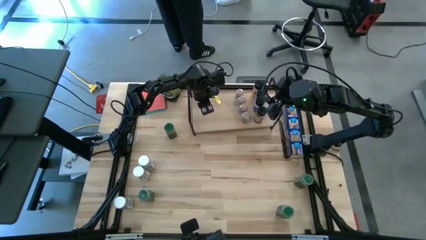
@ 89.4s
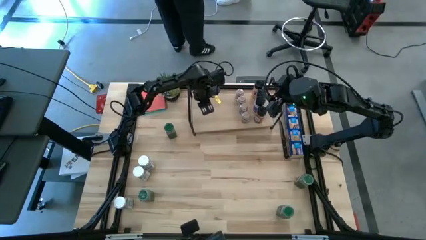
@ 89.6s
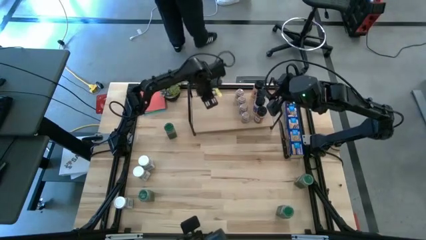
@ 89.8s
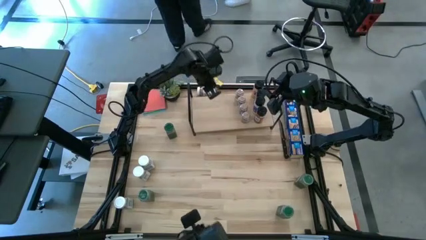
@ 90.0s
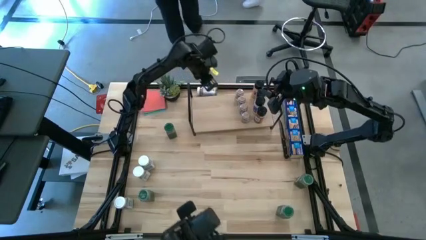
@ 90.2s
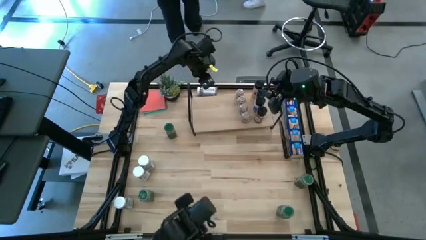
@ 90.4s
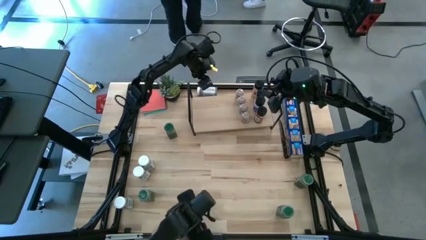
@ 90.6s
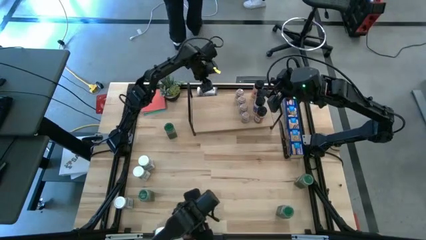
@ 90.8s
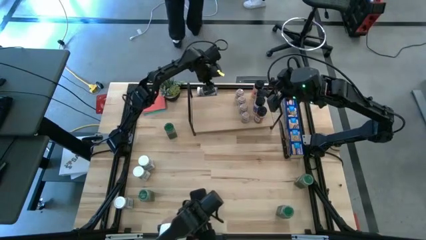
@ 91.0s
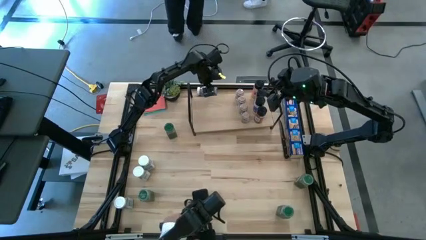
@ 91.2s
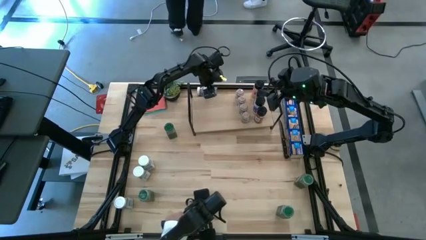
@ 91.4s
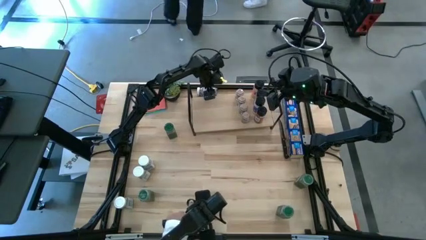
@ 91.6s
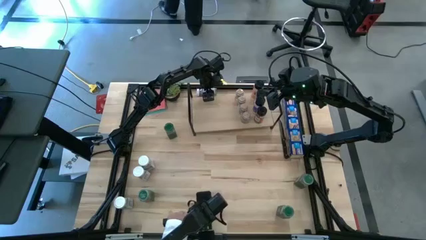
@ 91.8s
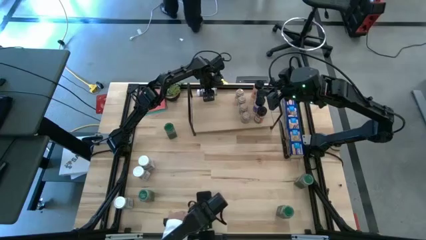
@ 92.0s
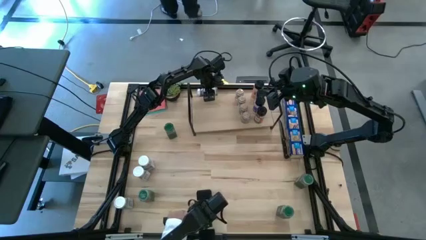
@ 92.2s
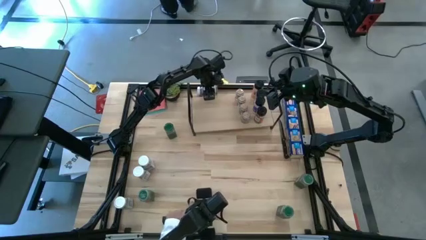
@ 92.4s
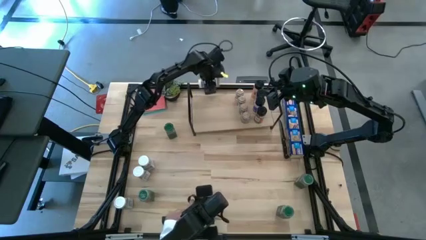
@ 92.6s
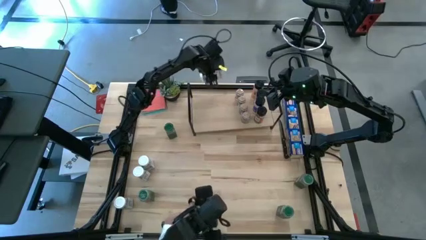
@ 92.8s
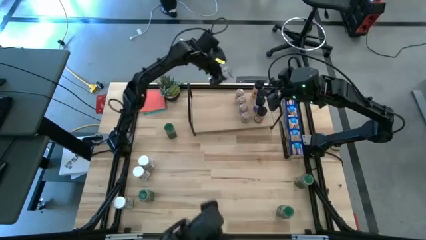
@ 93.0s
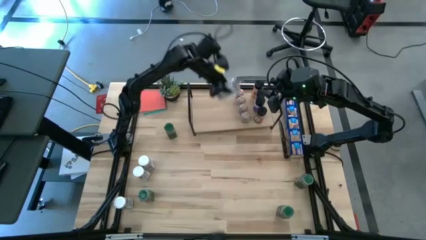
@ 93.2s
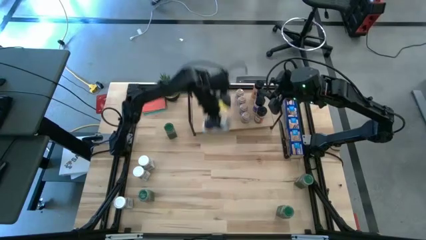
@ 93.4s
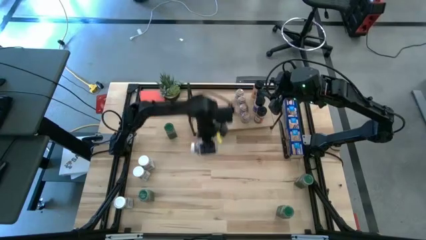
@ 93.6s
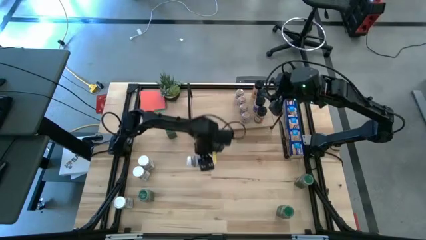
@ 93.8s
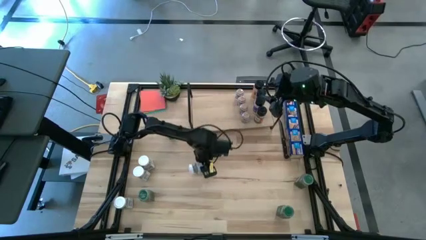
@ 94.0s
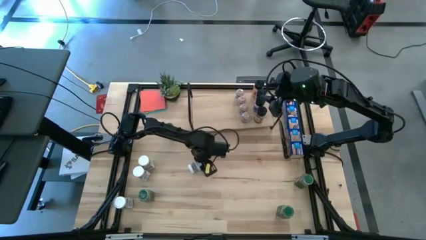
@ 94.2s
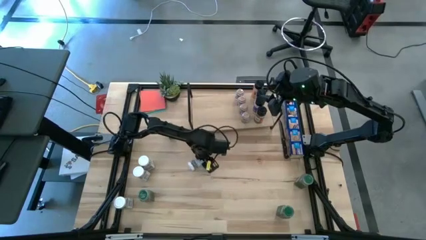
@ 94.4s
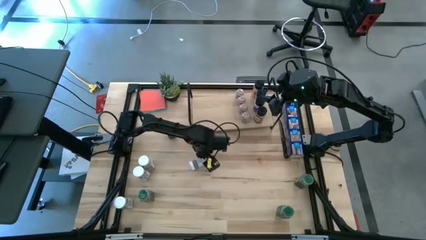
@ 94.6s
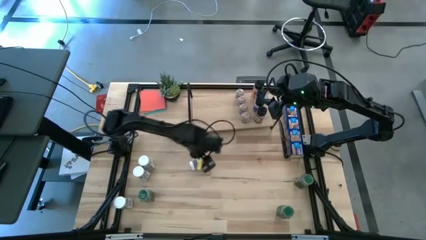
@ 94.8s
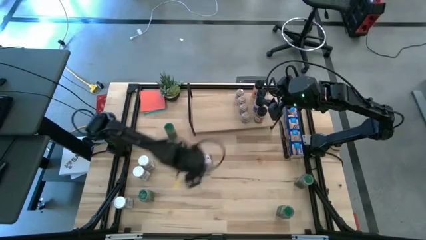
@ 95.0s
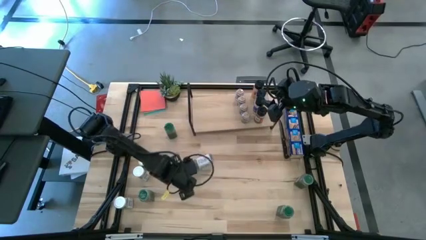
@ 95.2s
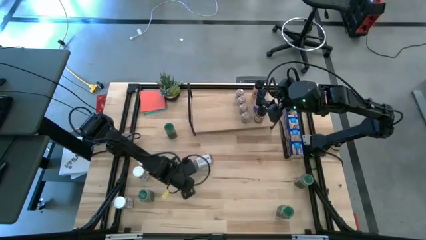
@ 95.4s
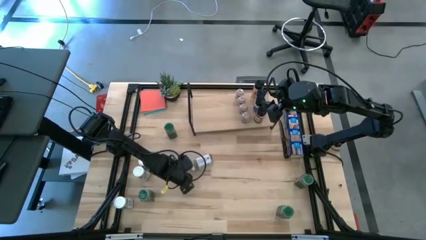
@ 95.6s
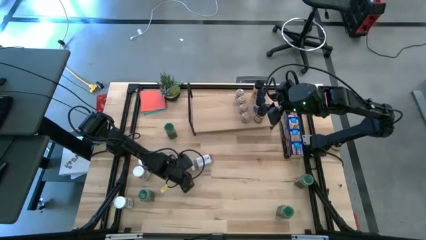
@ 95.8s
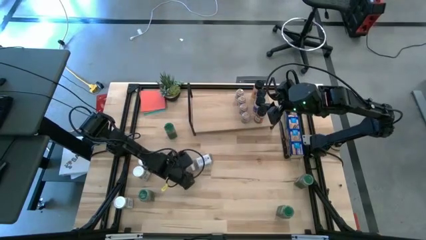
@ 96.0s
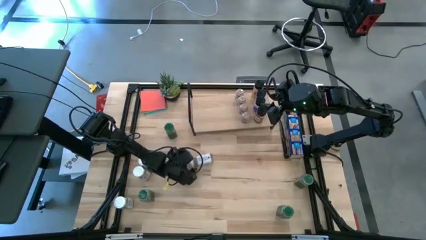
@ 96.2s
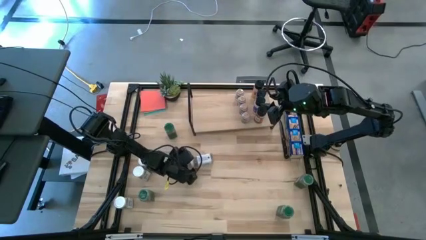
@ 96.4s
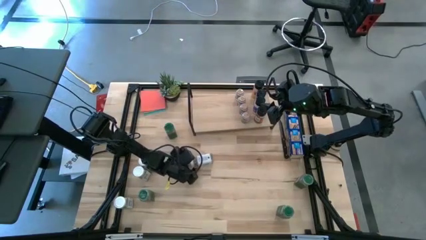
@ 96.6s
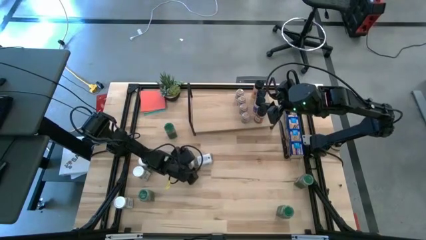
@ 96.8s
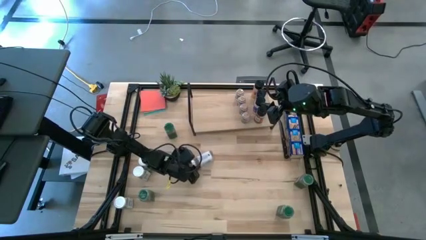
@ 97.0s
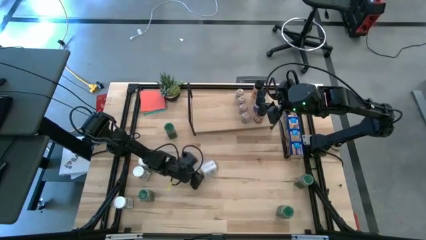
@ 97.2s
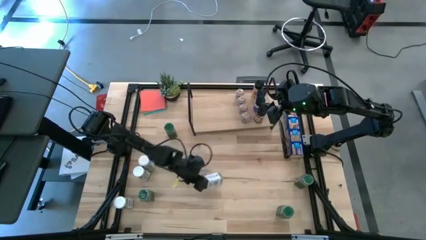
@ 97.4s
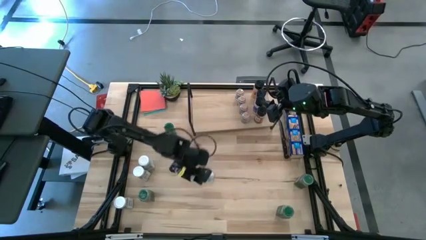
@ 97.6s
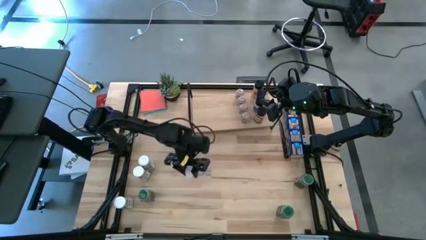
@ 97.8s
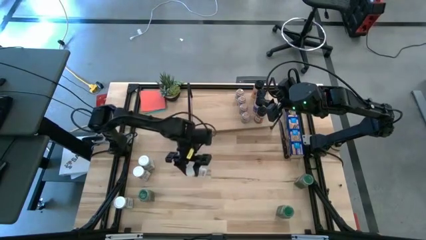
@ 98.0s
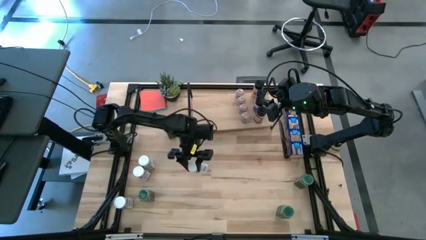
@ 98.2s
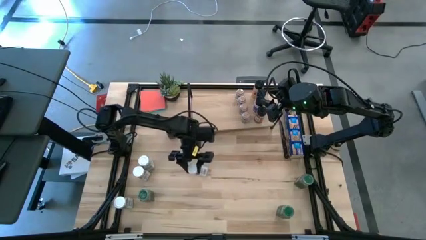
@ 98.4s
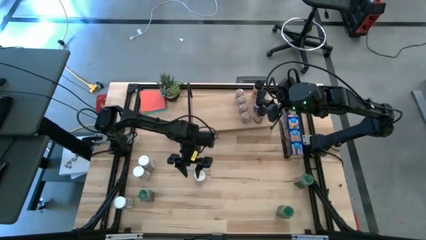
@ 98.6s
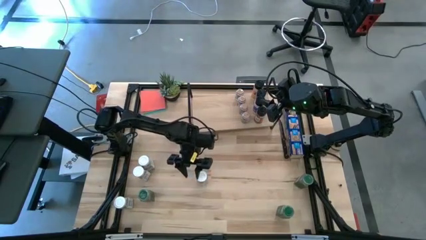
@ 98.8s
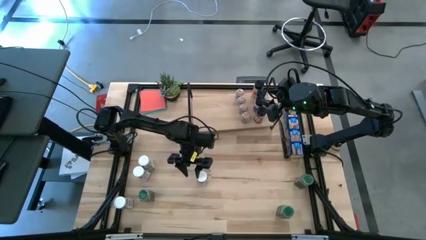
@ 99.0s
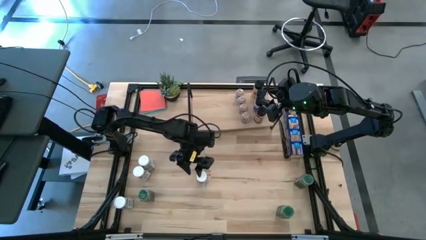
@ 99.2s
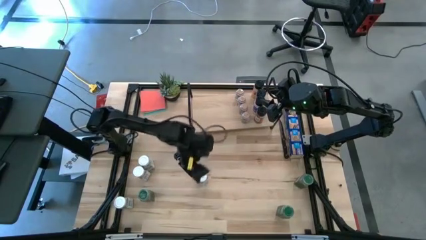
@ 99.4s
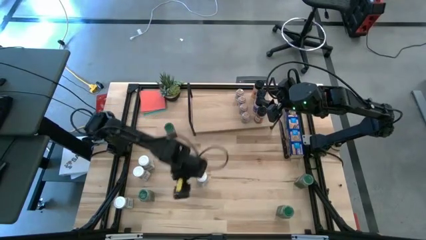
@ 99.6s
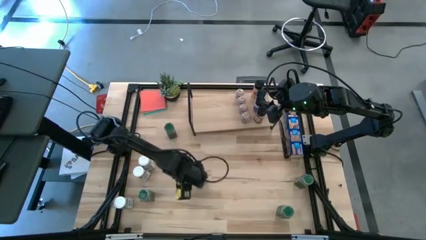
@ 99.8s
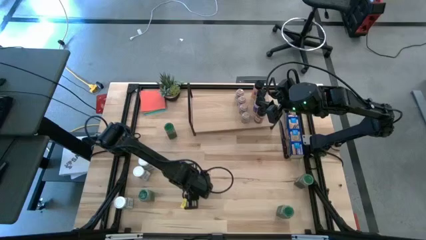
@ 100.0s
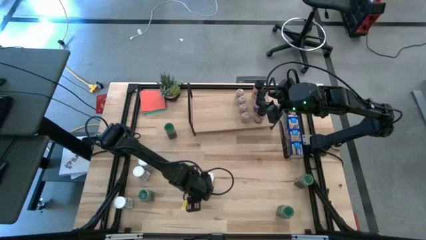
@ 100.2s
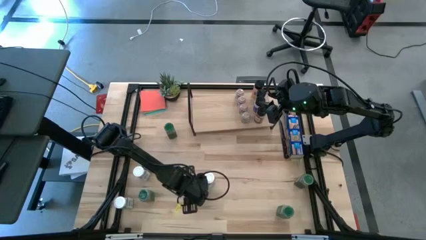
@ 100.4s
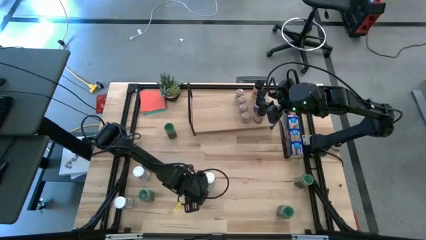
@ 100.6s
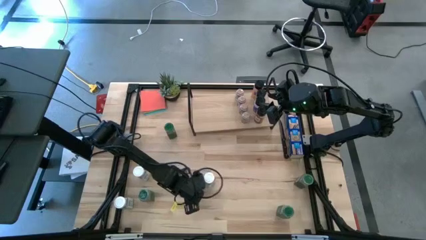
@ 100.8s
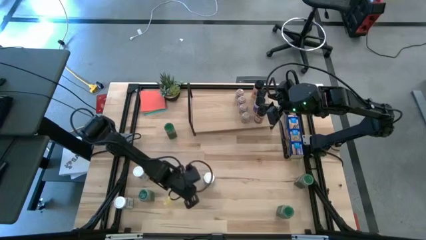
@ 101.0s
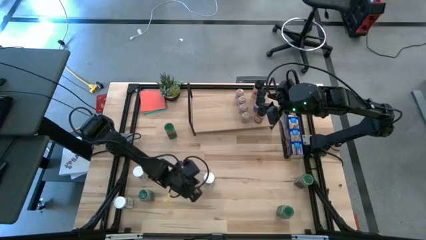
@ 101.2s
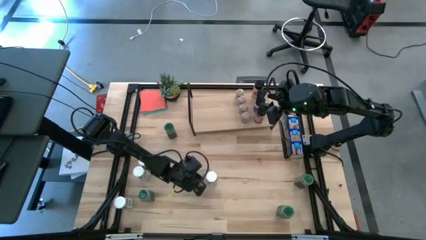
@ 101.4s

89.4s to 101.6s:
Task: Shelf spices
Put the white seasoning bottle on the shelf

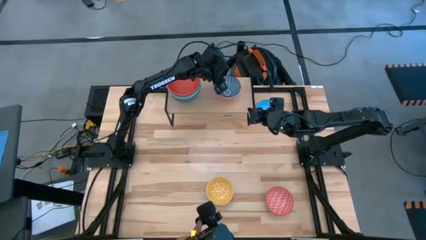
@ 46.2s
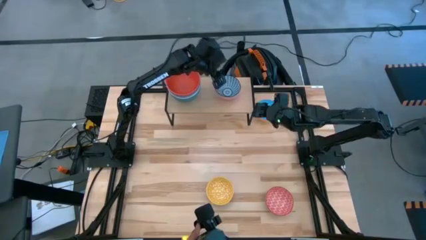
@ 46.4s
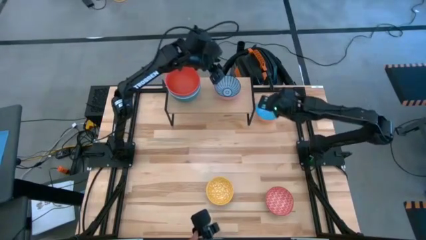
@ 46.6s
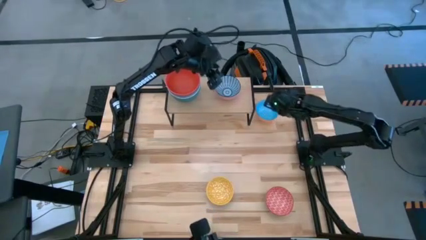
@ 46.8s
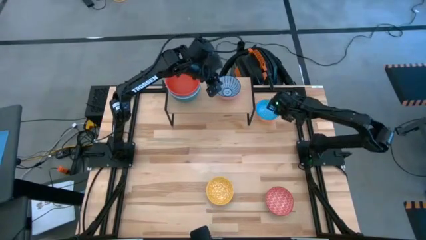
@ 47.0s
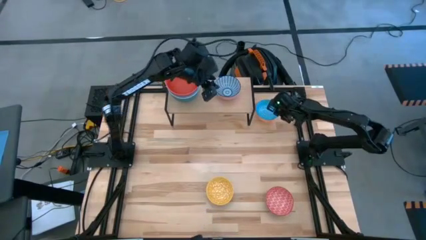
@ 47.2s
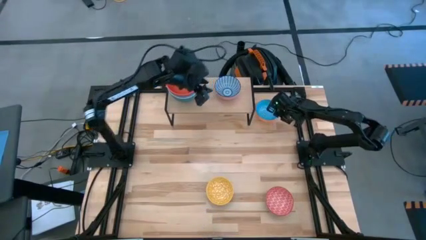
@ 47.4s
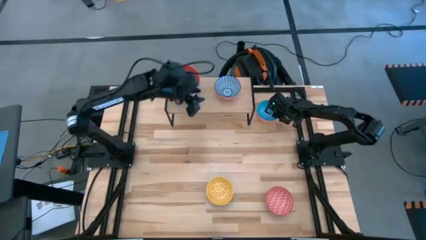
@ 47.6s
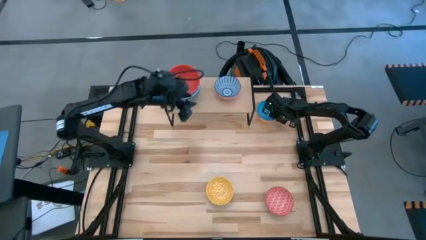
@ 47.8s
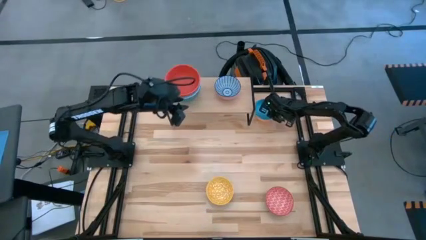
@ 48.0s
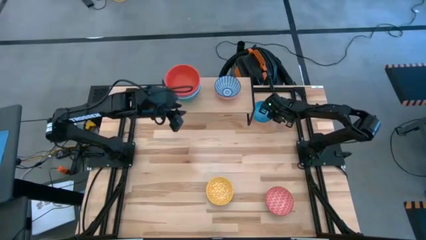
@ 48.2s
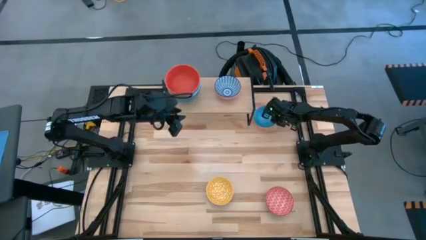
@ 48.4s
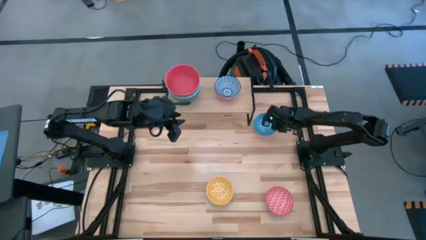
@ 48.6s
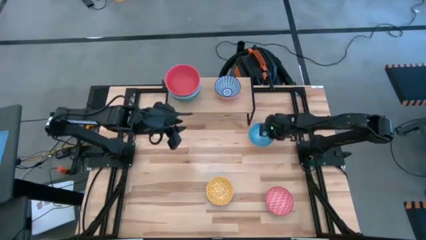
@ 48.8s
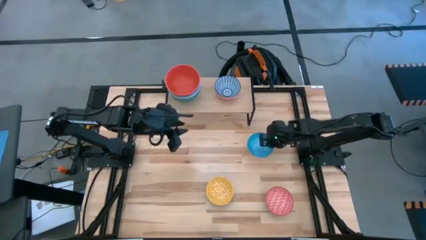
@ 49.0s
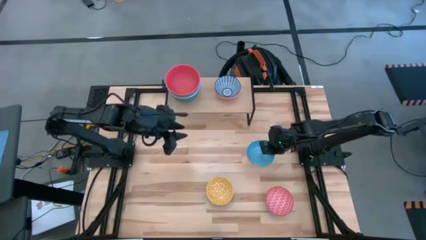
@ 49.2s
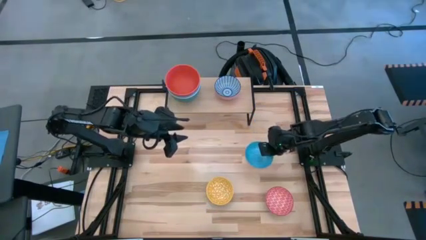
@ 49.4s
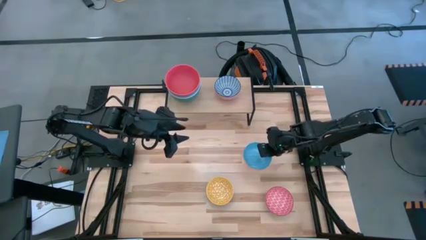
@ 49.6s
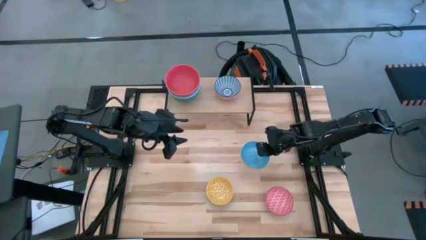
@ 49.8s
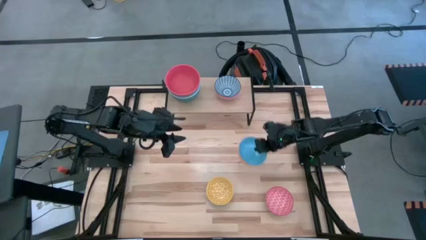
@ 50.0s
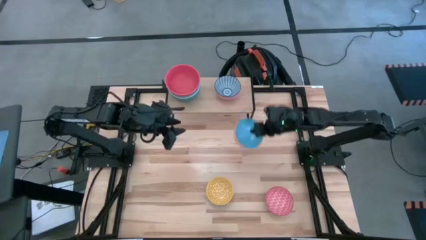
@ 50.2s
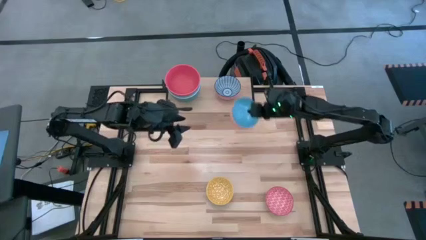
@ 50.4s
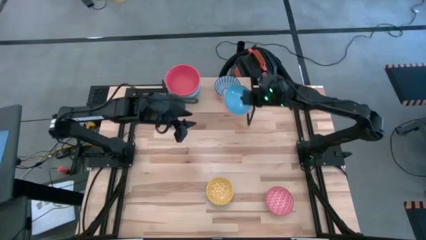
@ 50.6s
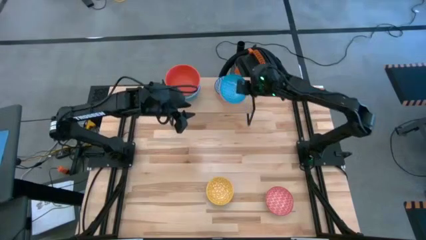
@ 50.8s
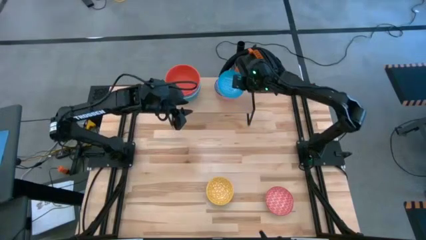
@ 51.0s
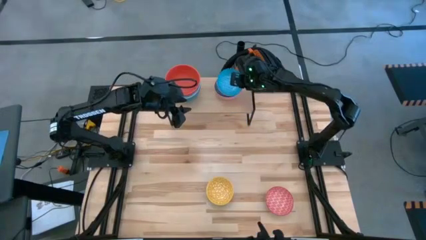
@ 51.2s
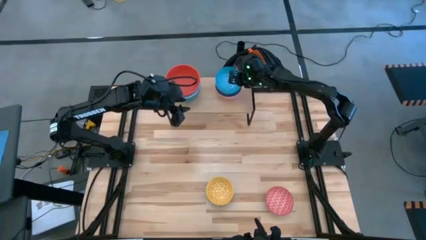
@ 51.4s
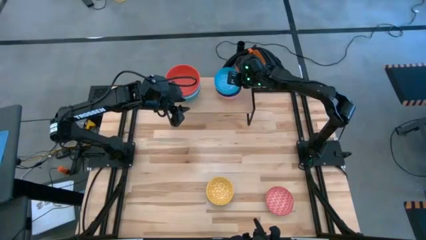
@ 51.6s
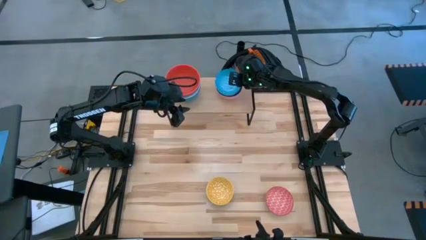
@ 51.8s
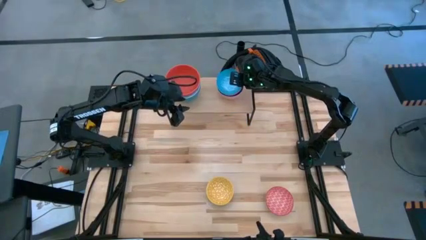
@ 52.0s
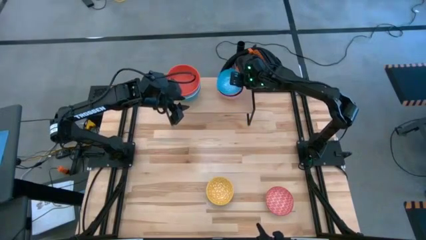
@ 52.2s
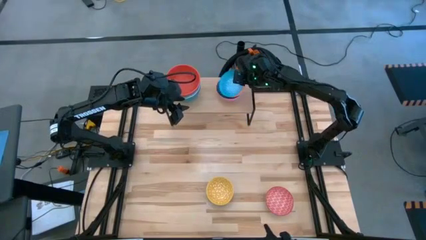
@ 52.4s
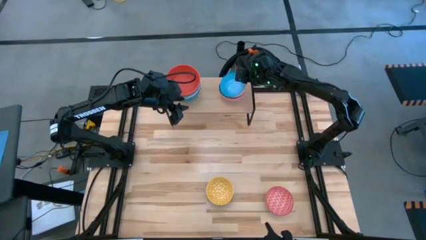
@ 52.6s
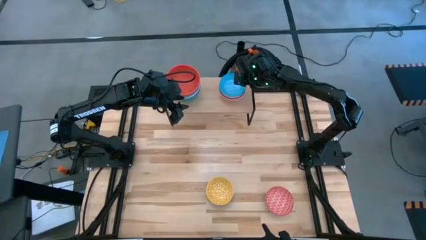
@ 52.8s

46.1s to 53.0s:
Task: Place and stack bowls onto a shelf
Stack the light blue printed bowl into the dark blue printed bowl
